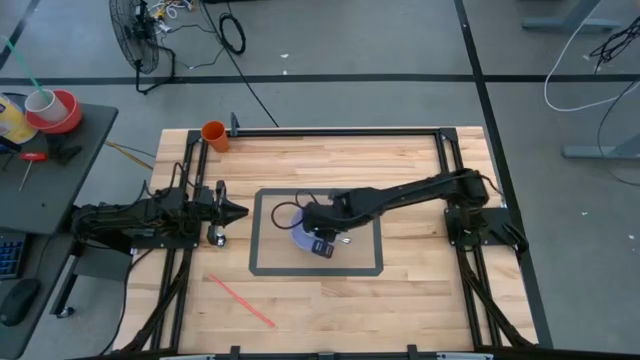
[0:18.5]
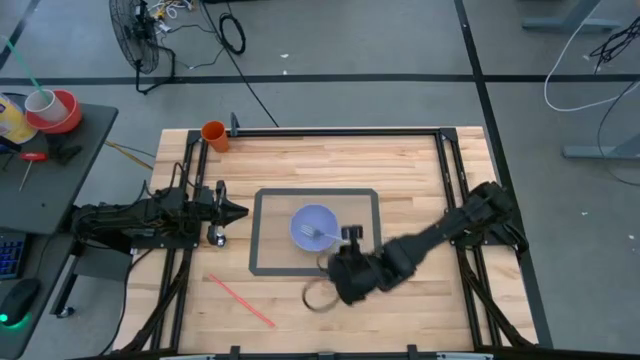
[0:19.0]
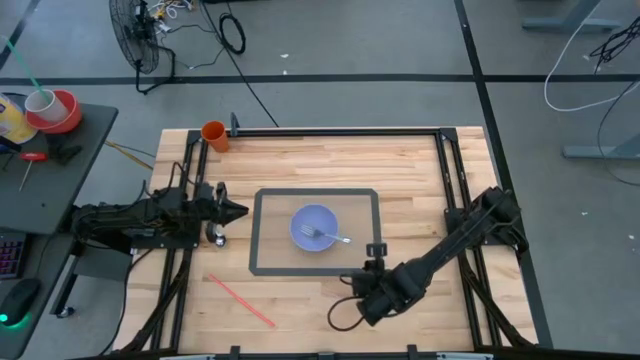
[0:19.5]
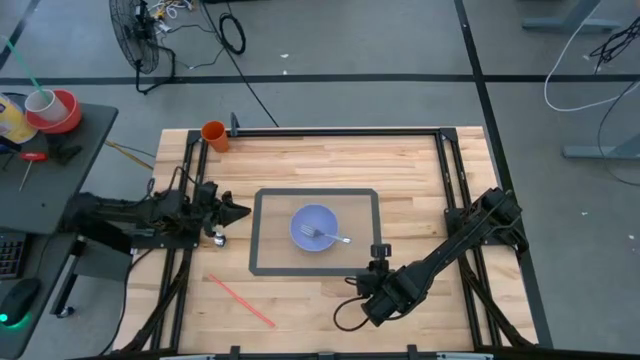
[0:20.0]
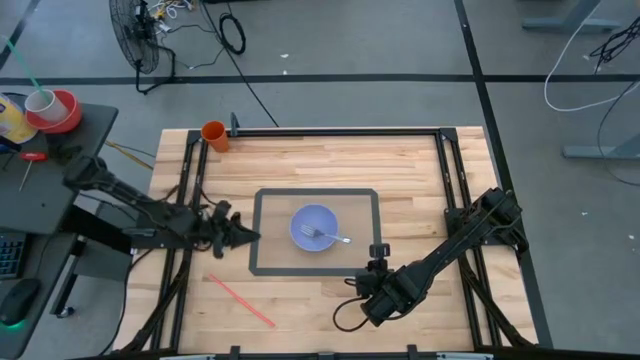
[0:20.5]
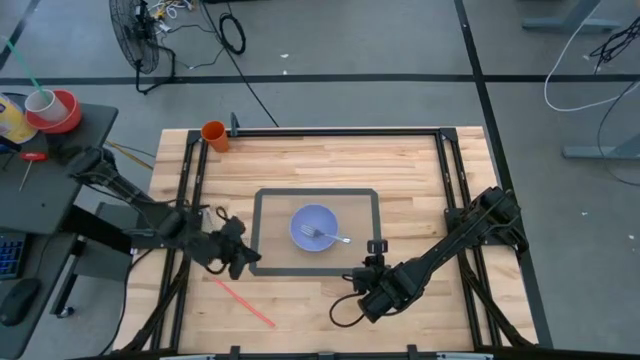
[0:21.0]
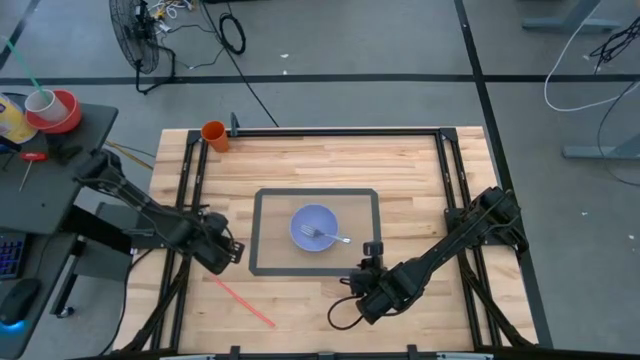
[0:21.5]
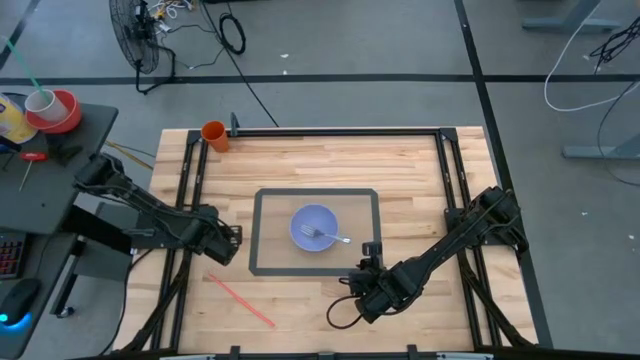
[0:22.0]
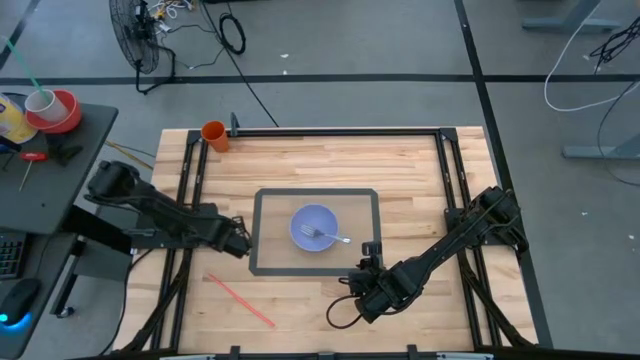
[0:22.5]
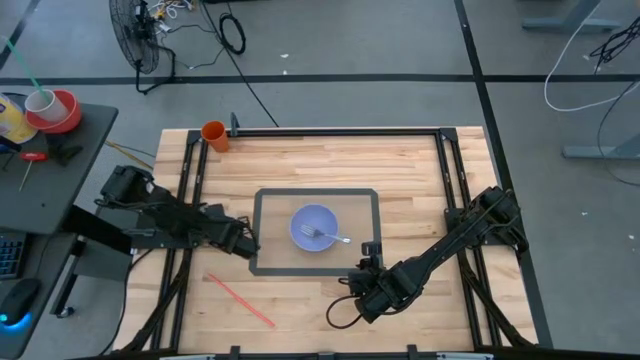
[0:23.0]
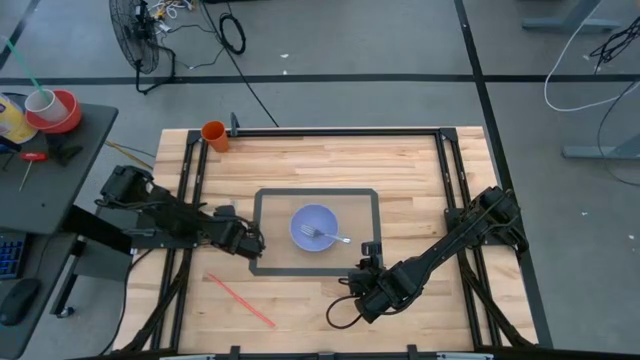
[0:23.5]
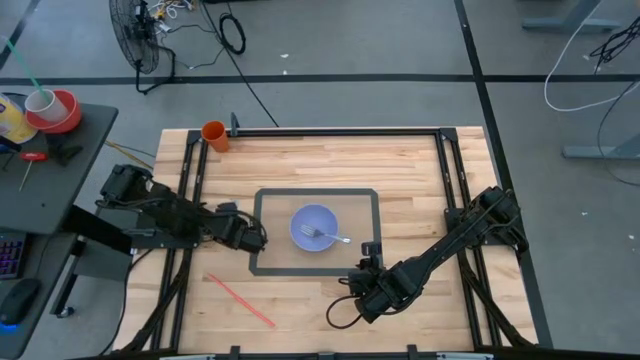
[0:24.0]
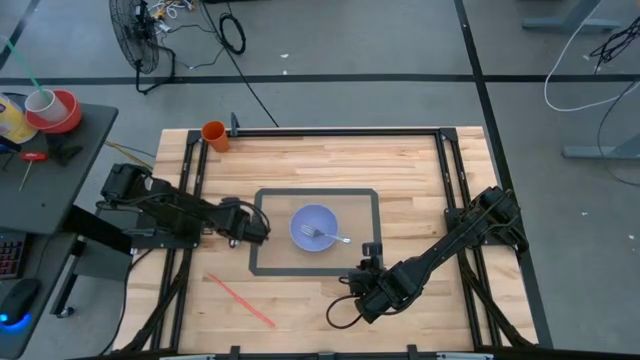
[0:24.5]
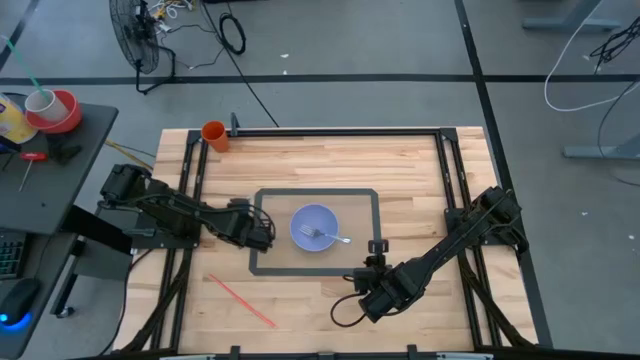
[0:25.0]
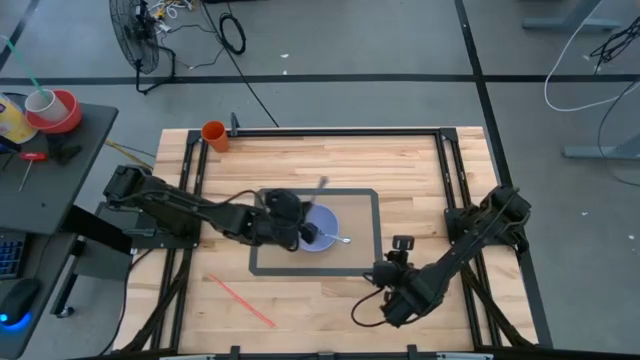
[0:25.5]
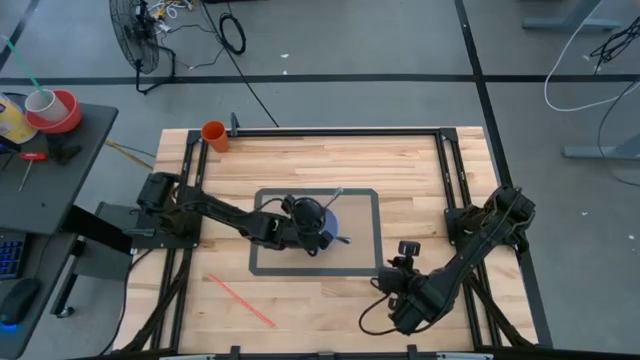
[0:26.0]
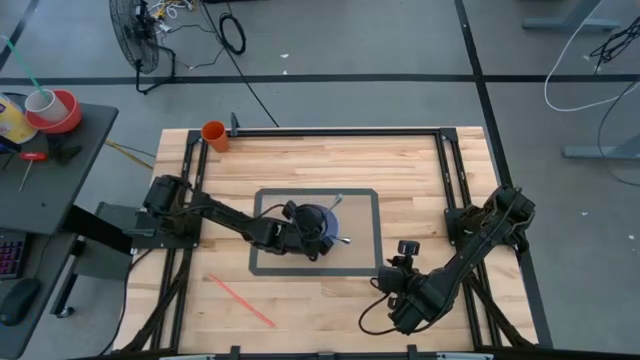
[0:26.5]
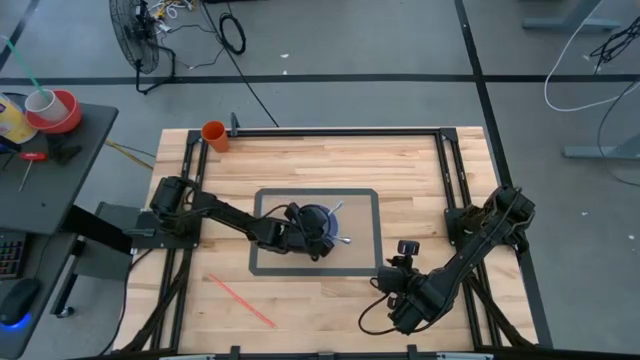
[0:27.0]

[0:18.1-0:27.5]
Task: Pick & Place Utensil
Put the silver spoon into the purple bowl

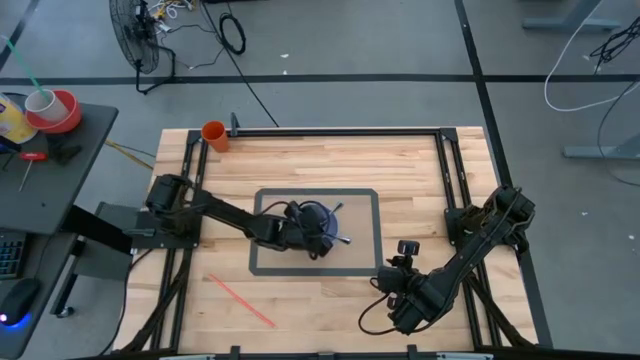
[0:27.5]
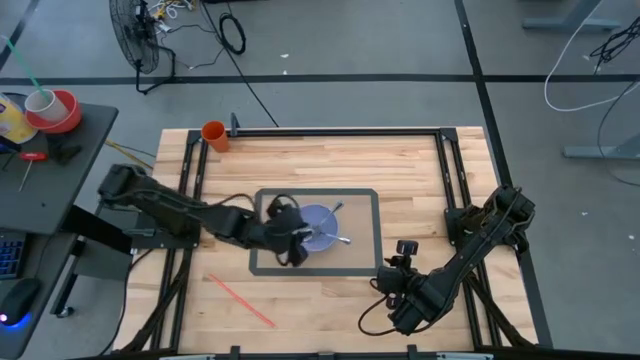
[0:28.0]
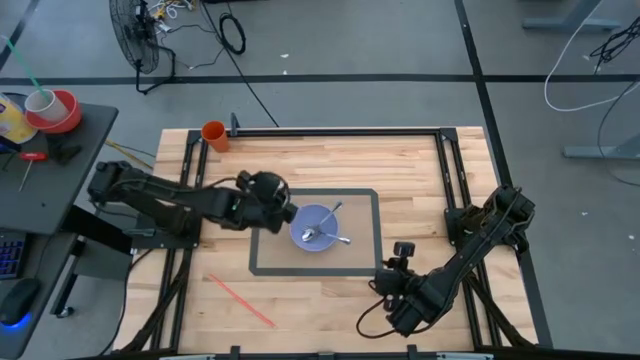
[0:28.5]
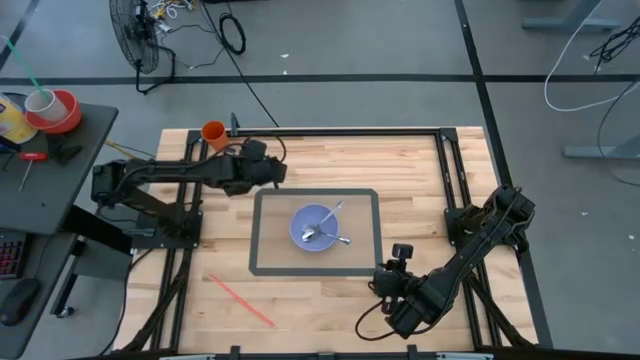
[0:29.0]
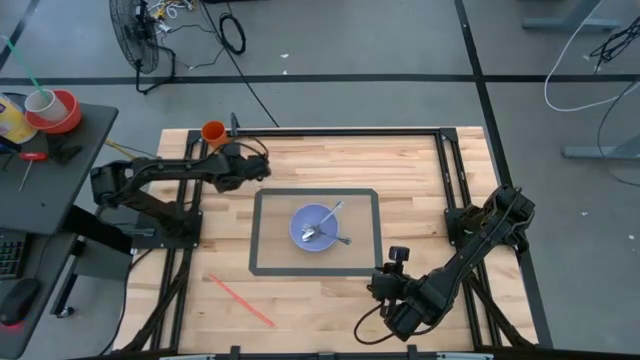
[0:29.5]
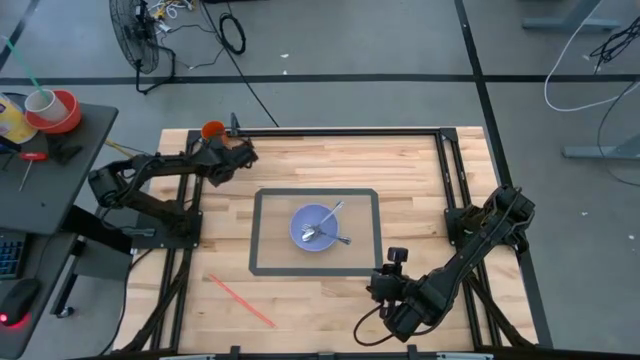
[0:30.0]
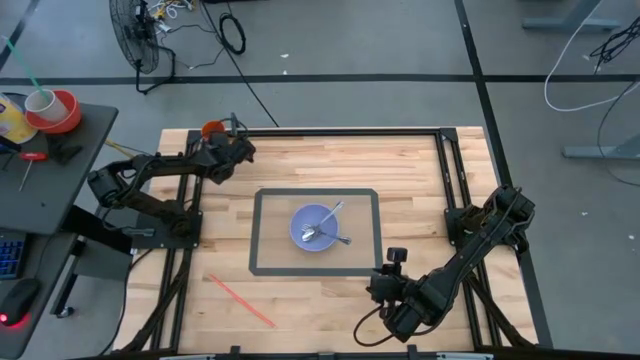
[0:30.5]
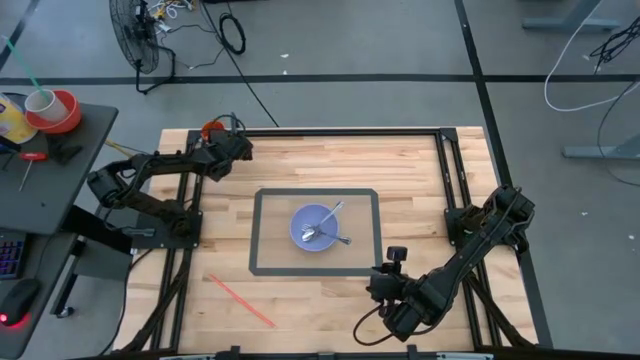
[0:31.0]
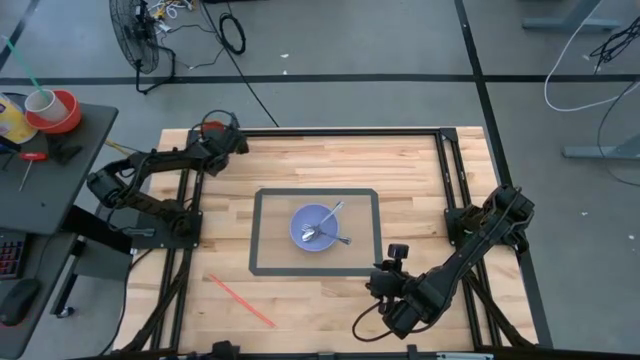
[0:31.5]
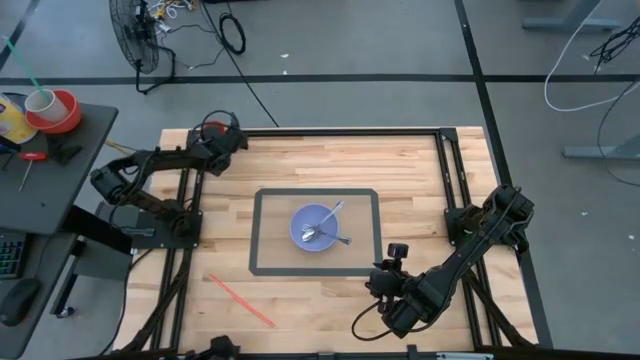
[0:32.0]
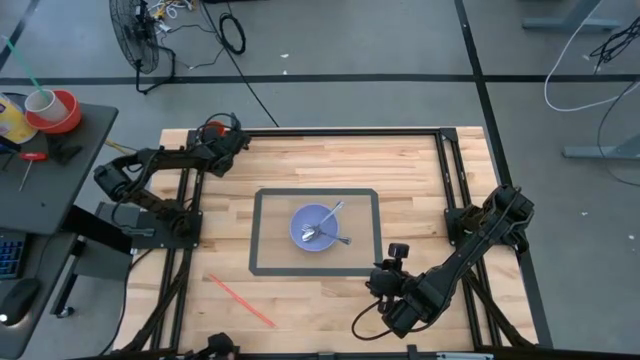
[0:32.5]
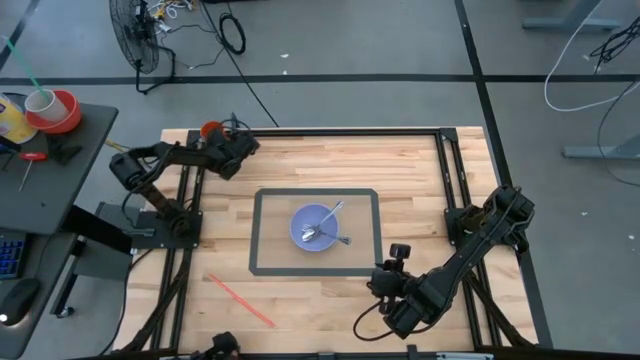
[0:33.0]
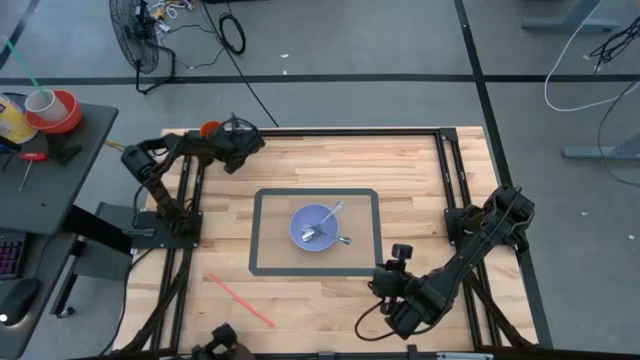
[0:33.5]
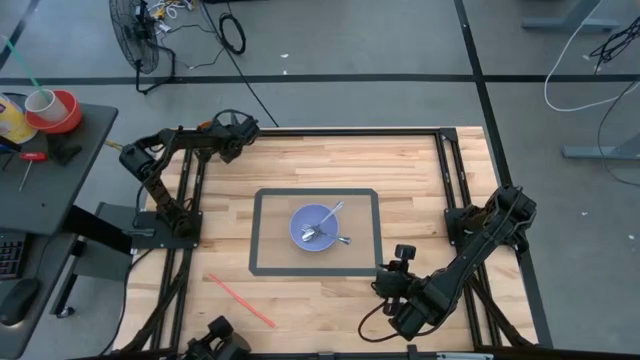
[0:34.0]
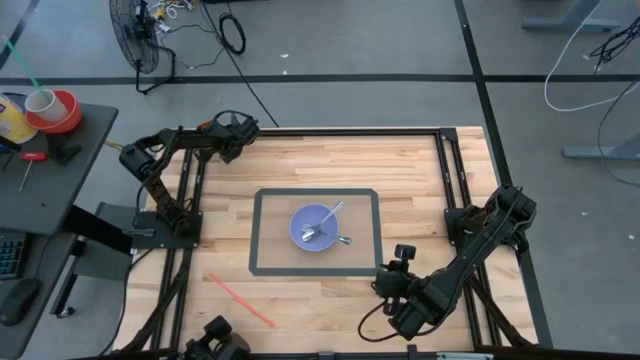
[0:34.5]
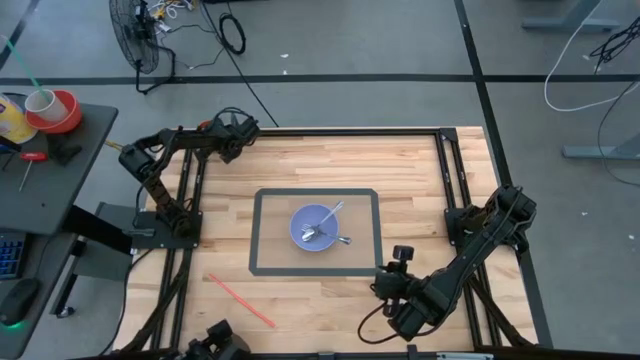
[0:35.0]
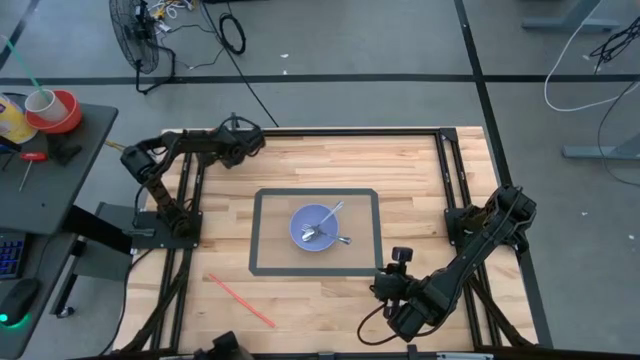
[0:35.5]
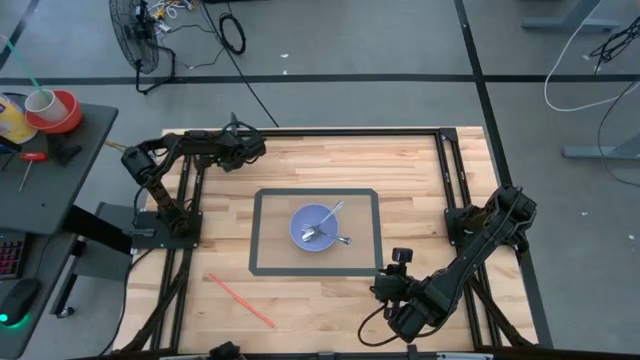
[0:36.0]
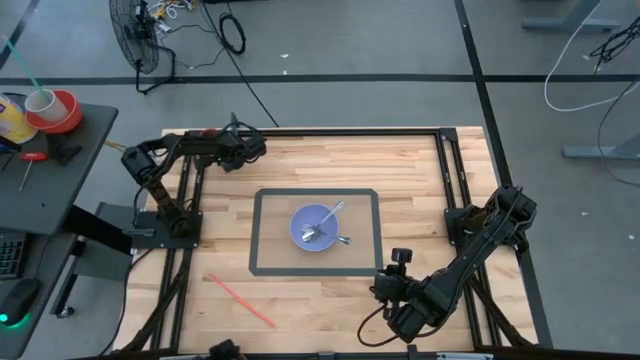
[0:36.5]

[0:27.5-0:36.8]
Put the orange cup on the mat to the top right of the purple bowl

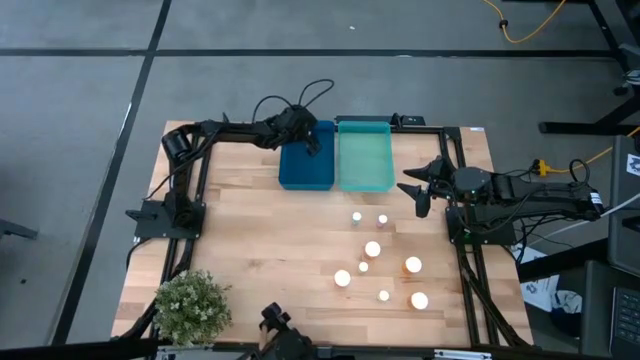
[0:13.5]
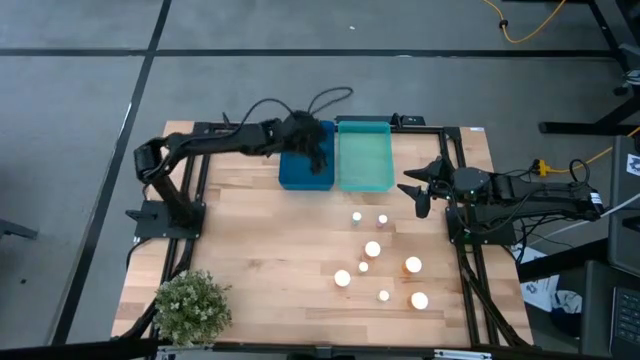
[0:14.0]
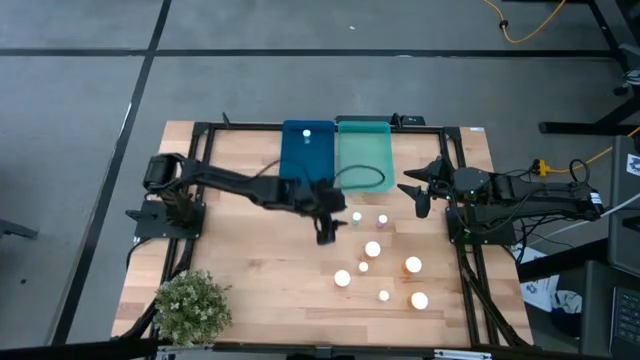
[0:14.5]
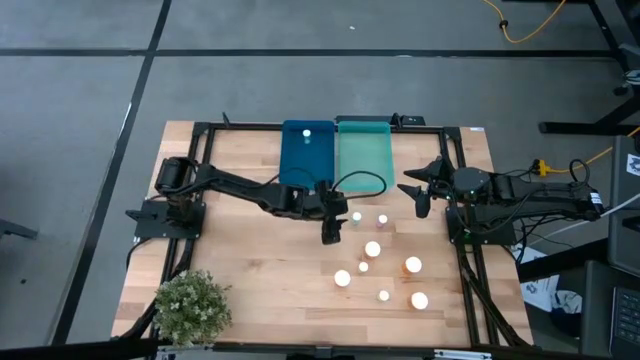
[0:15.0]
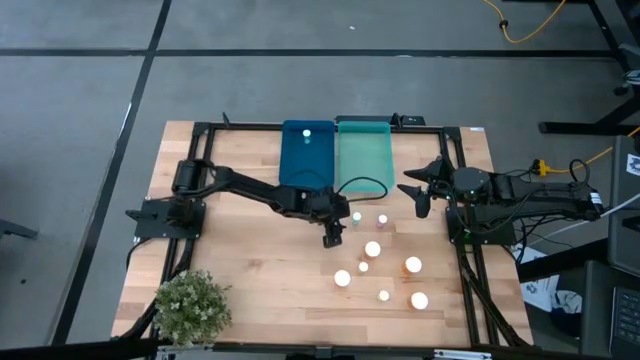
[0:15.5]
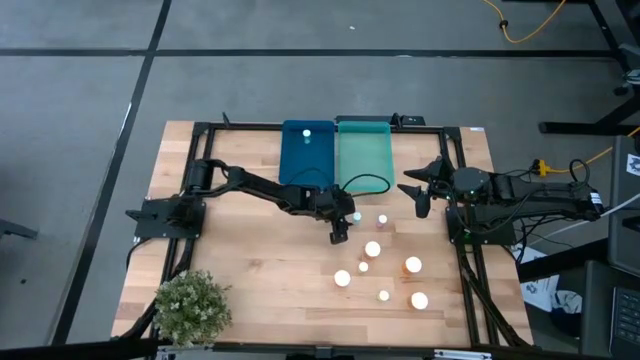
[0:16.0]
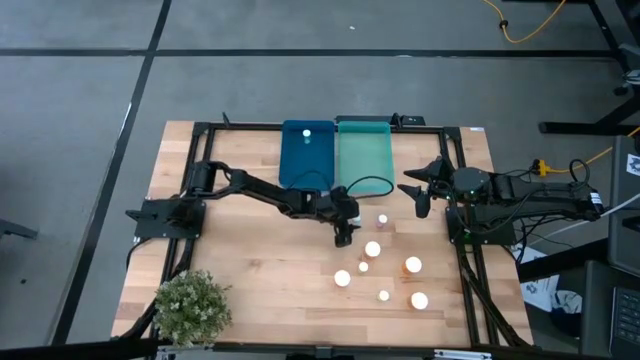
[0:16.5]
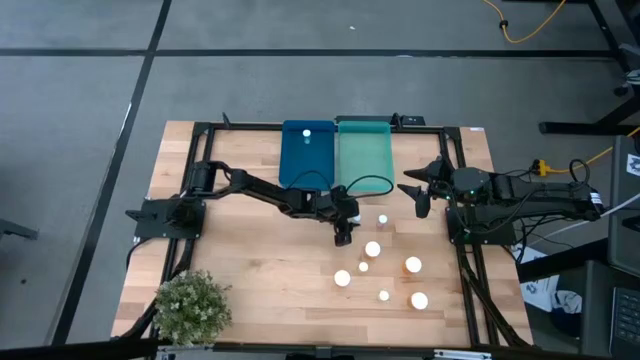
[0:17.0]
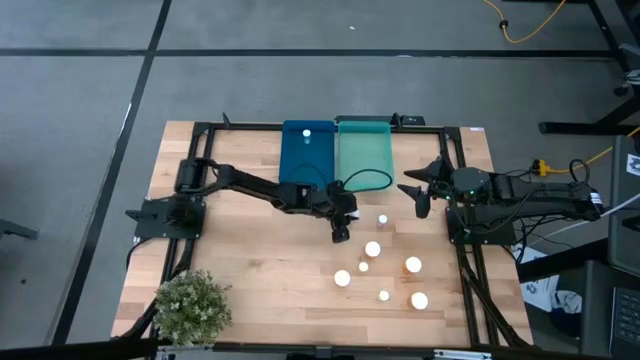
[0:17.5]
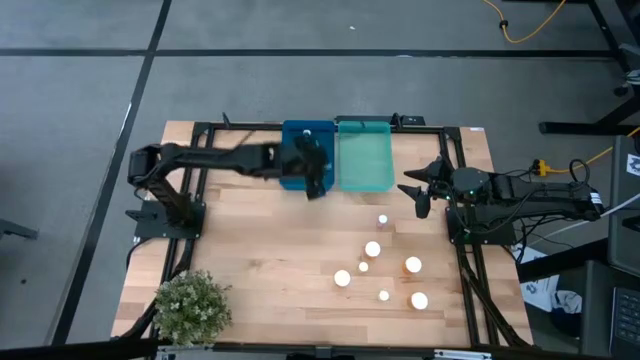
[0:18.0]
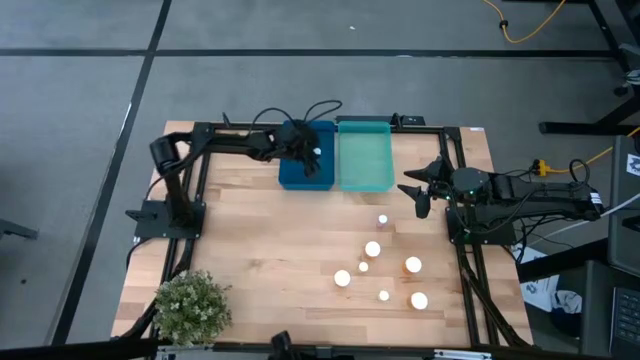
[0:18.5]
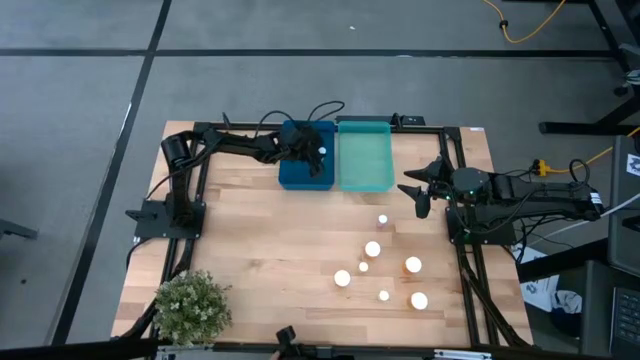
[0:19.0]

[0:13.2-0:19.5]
Task: Pick and place medicine bottles into bin by pill shape (circle, oval)
Put the blue pill bottle into the blue bin
